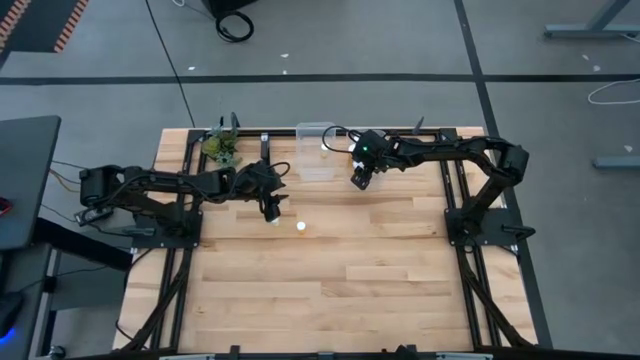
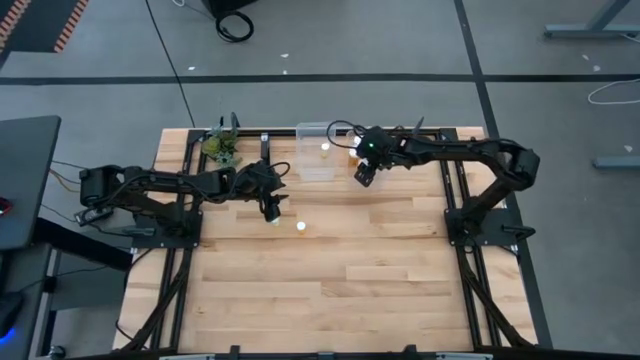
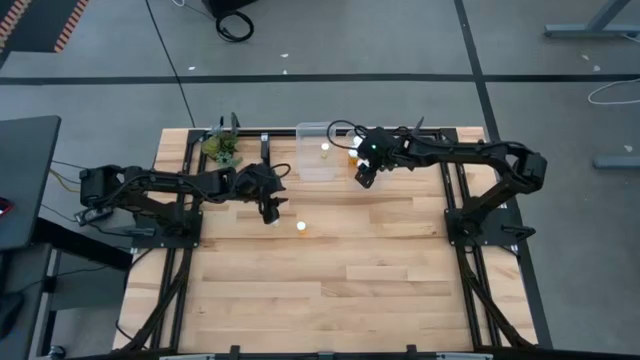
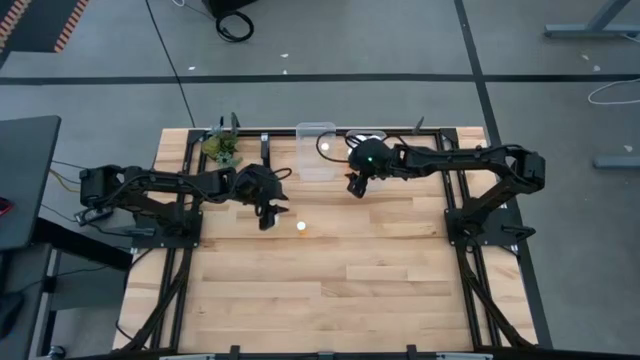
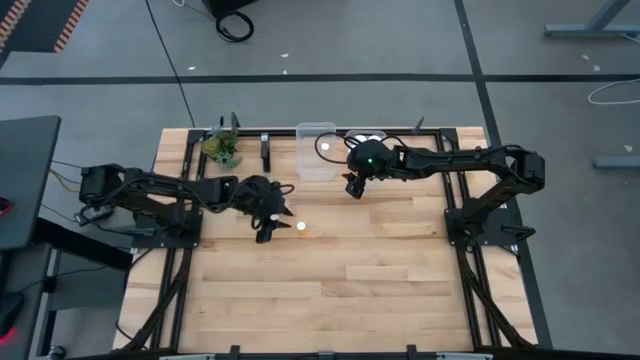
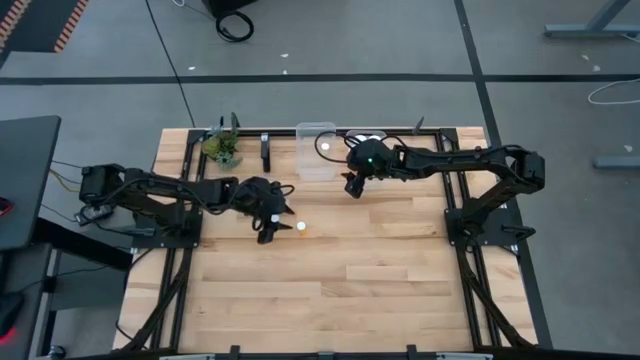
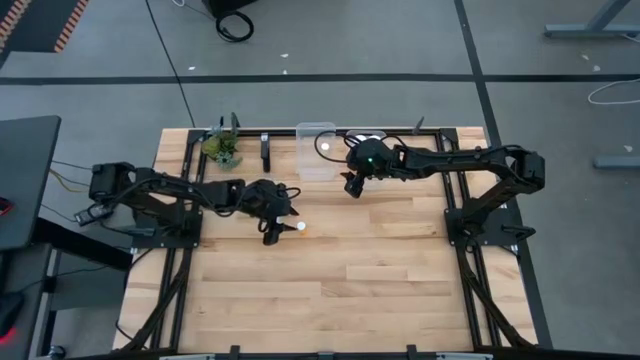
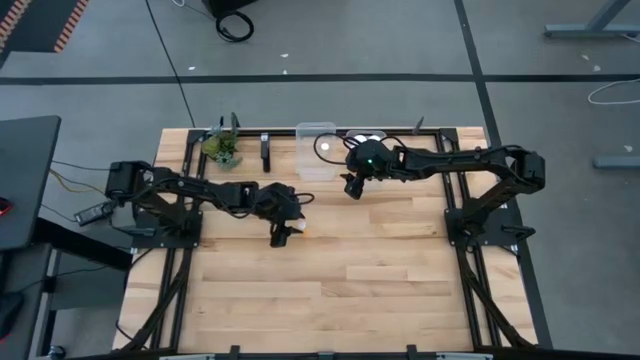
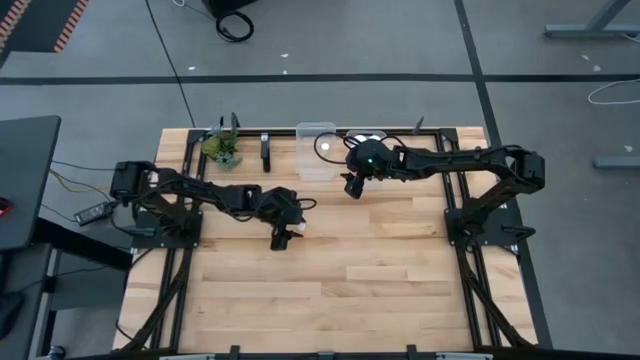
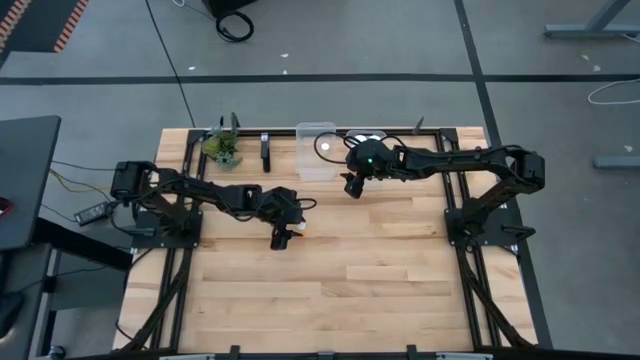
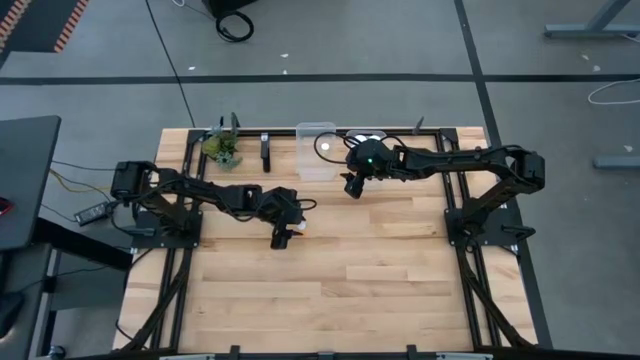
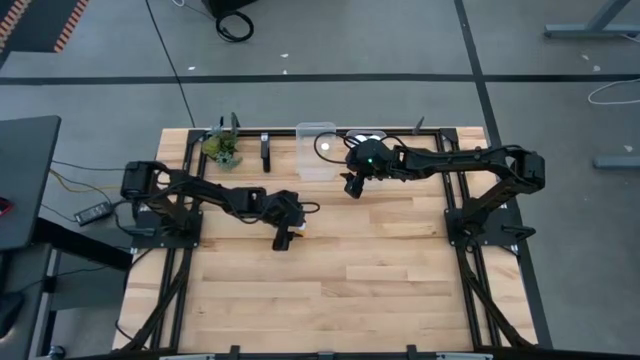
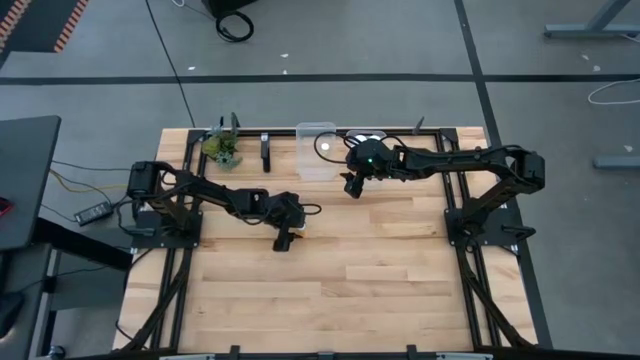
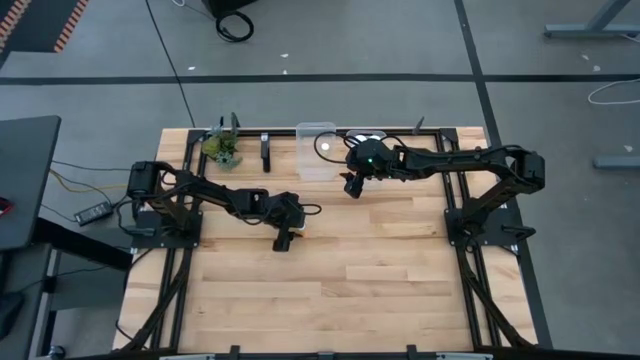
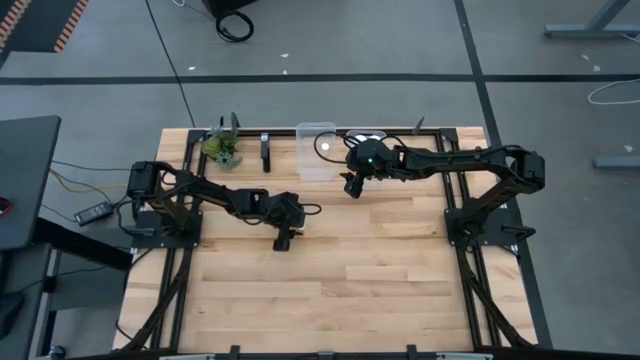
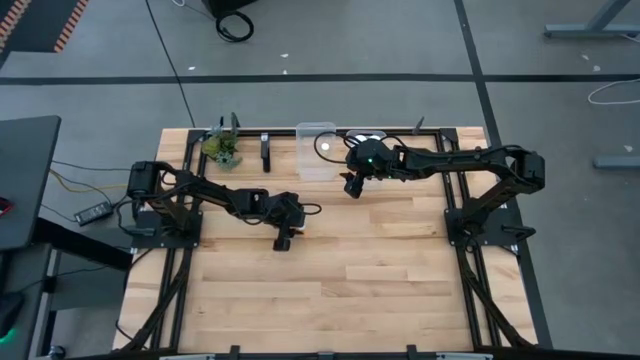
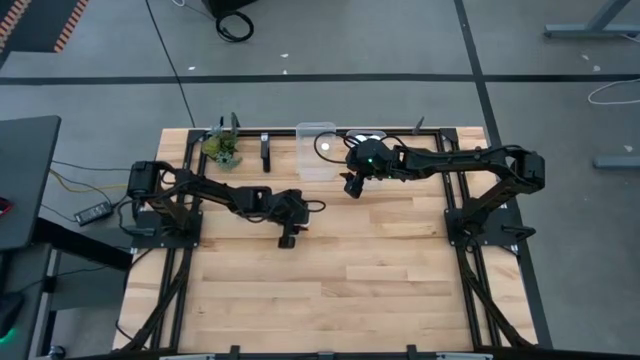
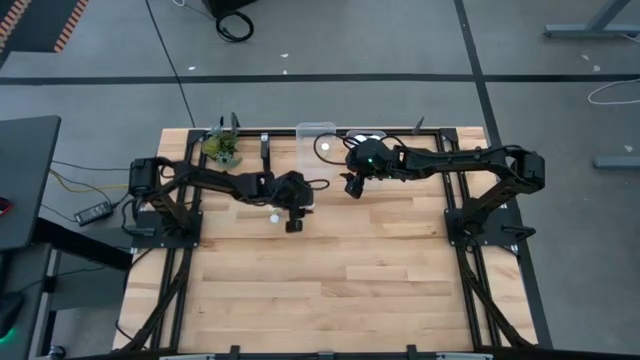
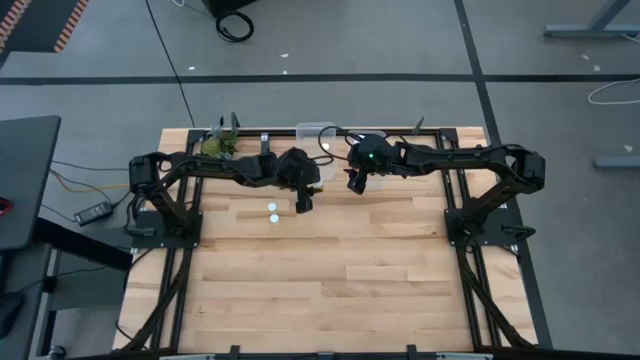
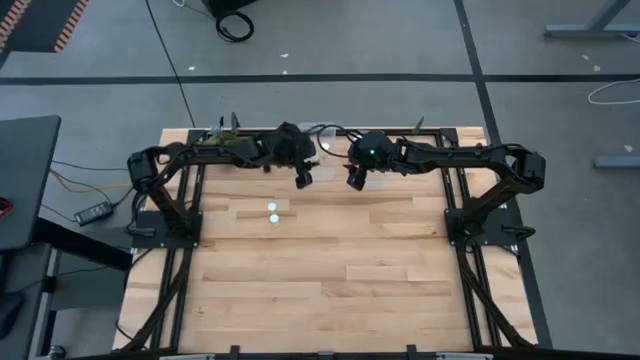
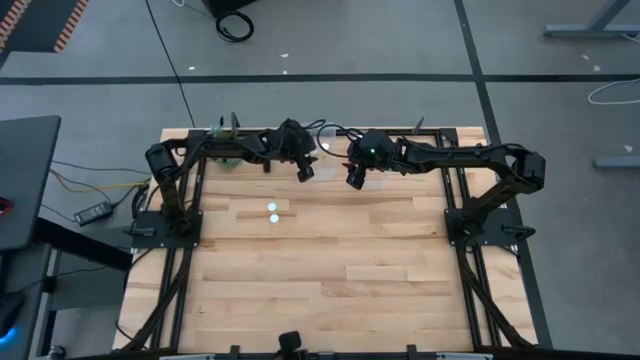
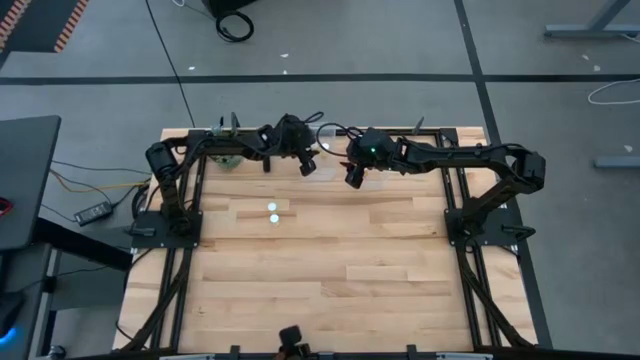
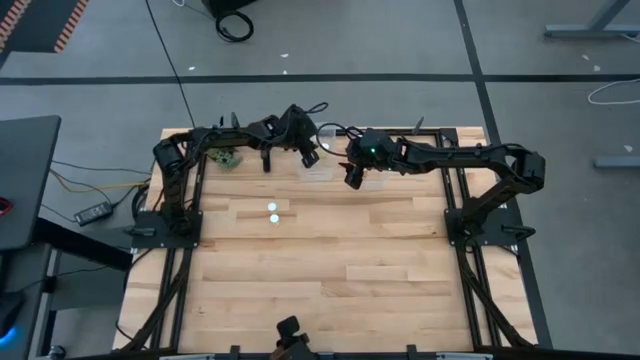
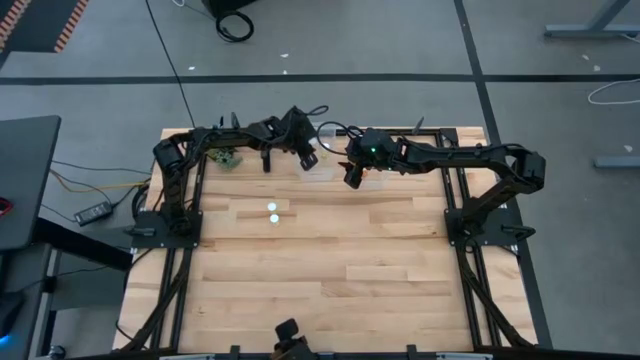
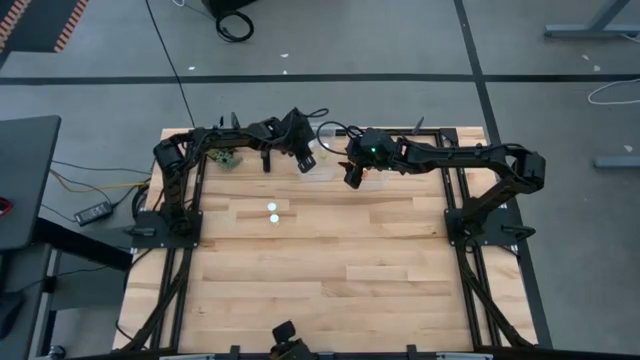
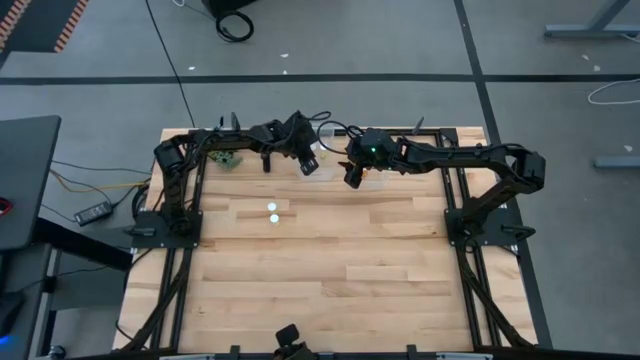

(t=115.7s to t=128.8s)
Task: Pick and place medicine bottles into bin by pill shape (circle, oval)
Put the small orange pill into the left transparent bin

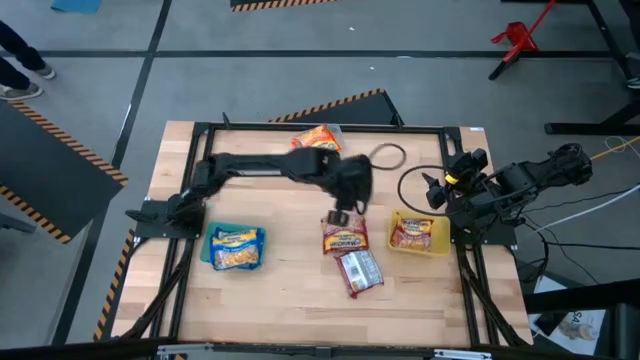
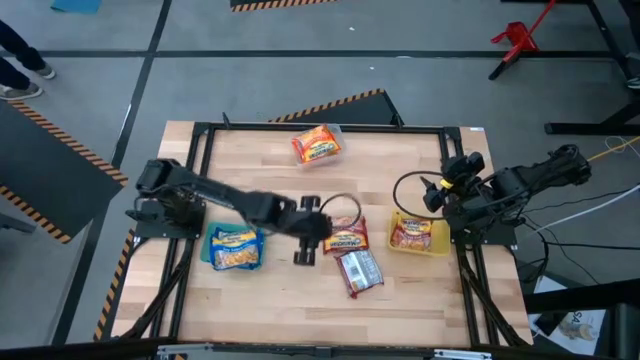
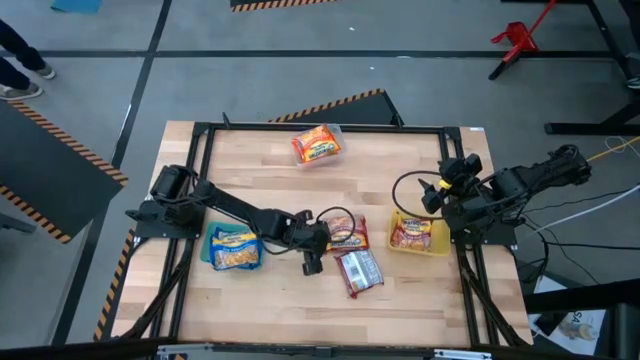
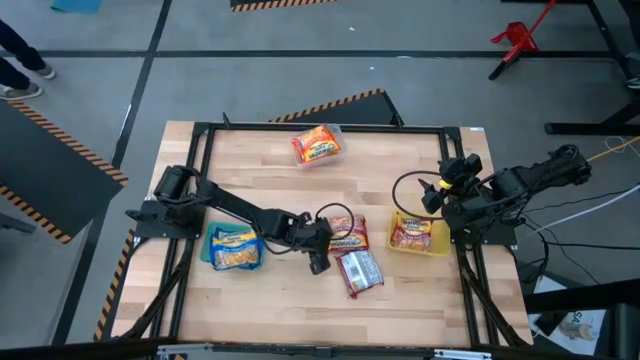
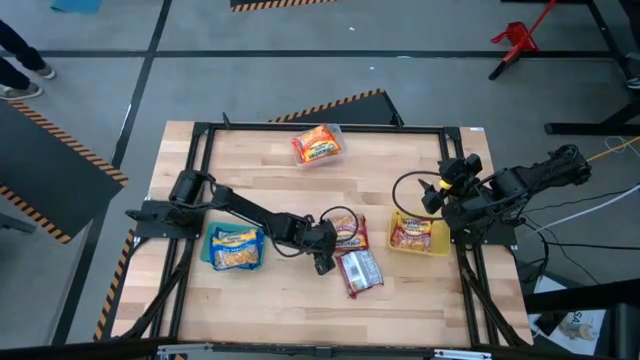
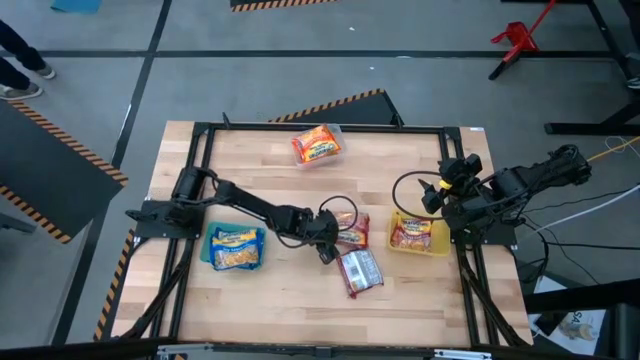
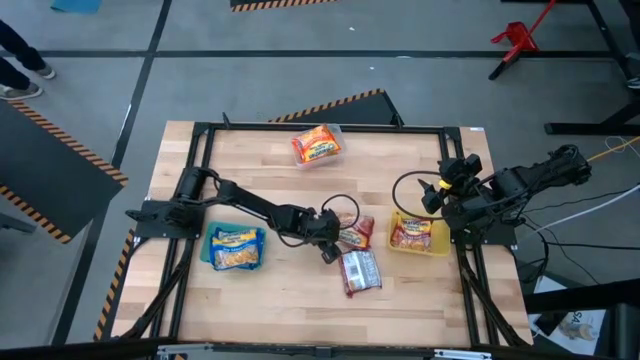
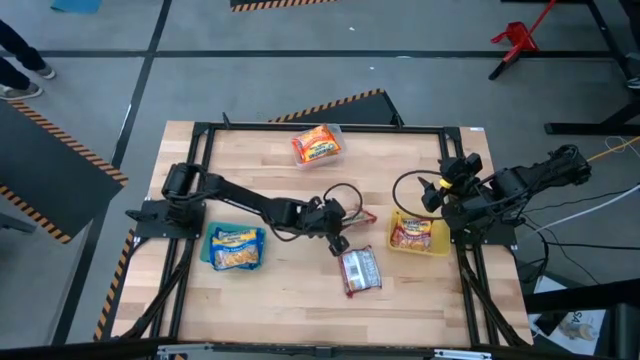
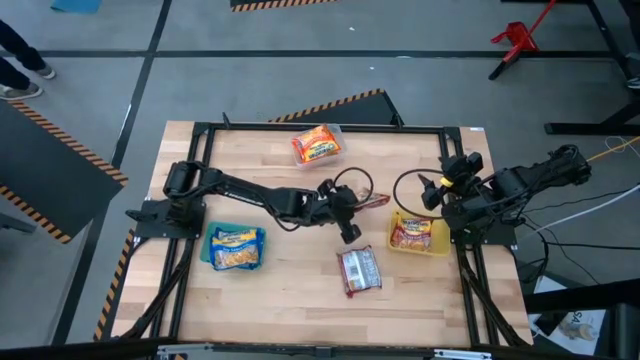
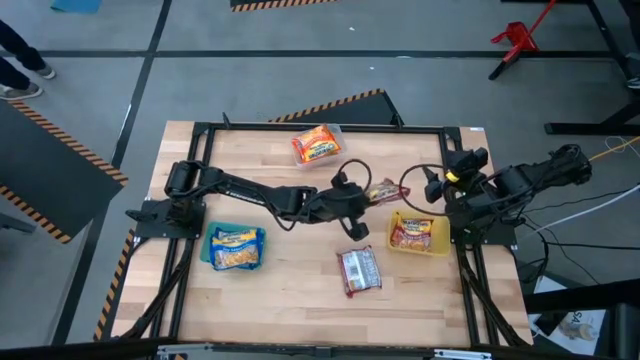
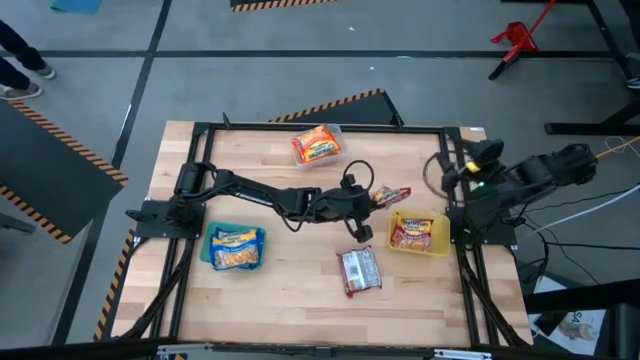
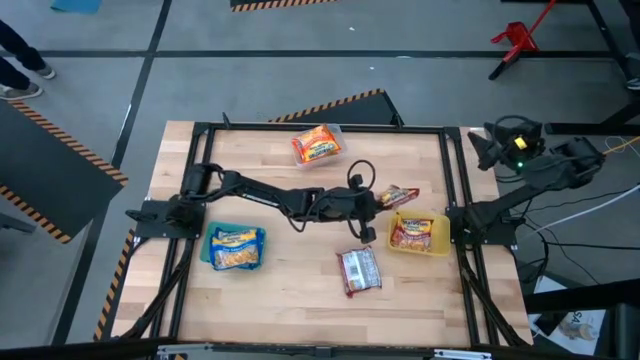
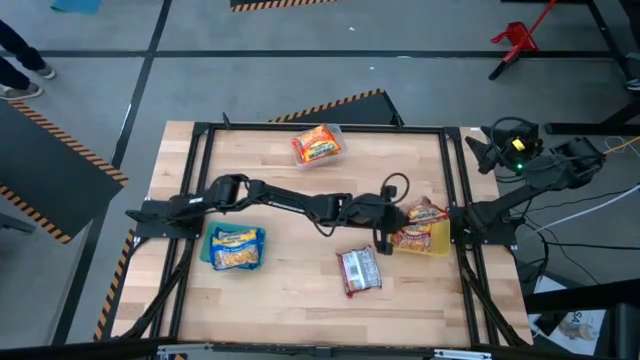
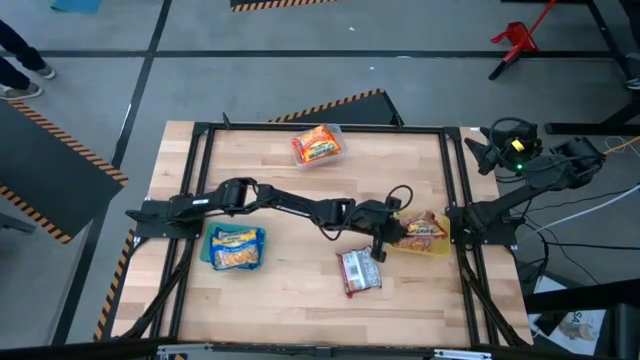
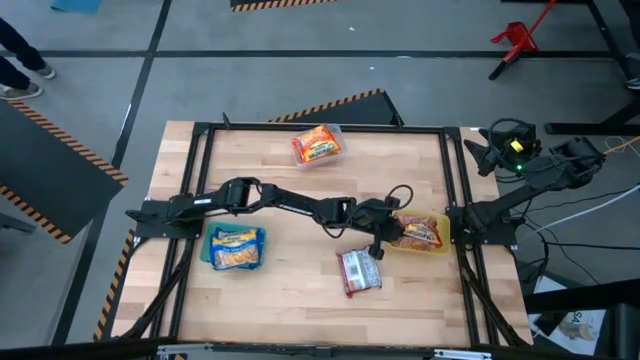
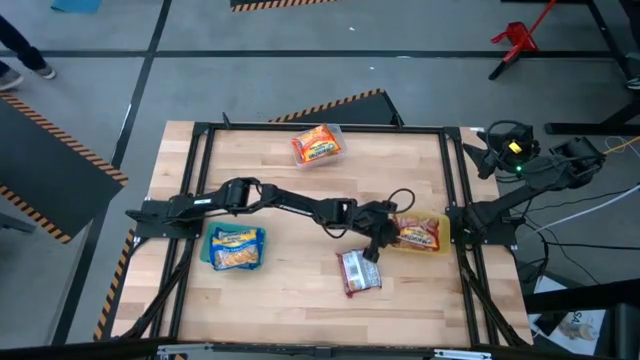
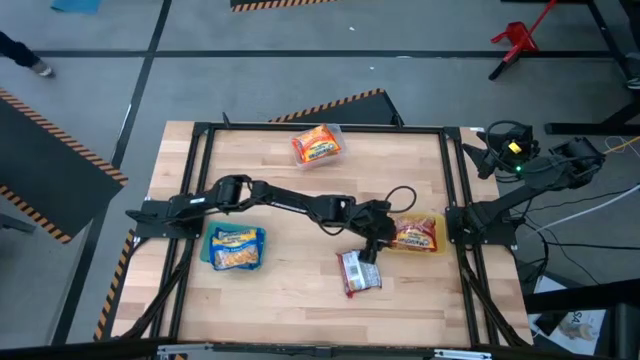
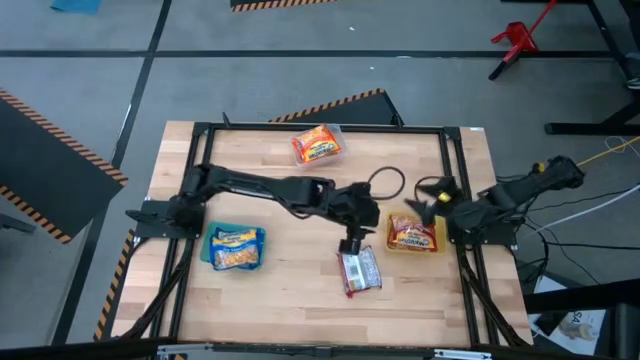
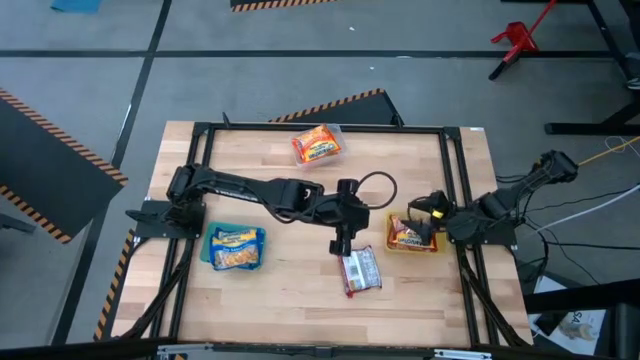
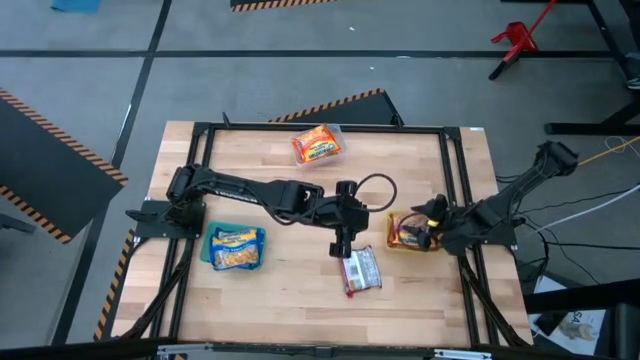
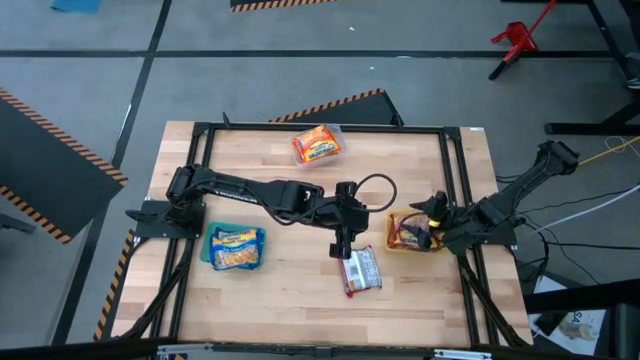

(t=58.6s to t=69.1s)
Task: Sort Maruchan noodles
Put the top red noodle pack into the yellow bin
